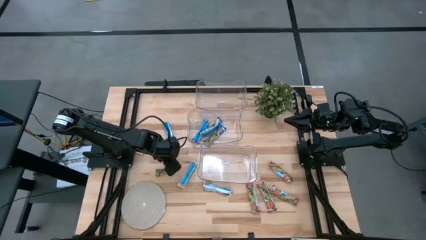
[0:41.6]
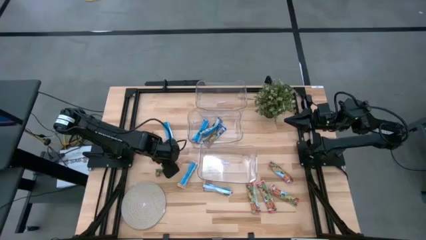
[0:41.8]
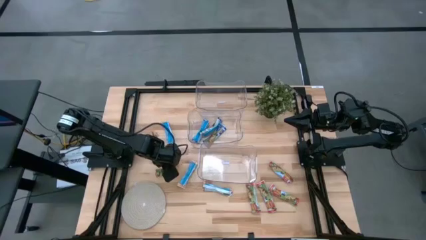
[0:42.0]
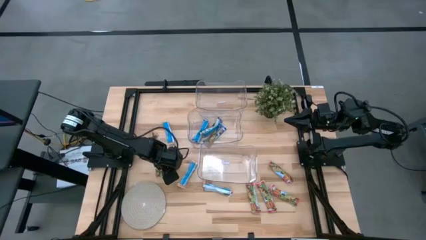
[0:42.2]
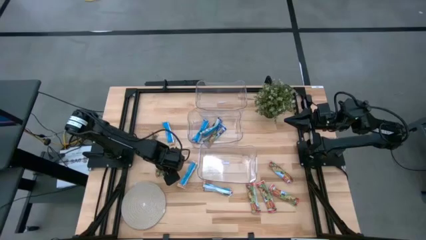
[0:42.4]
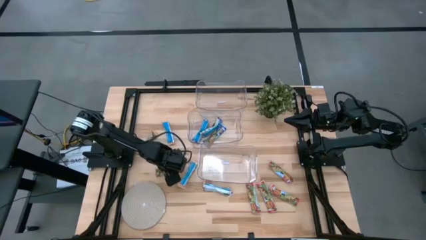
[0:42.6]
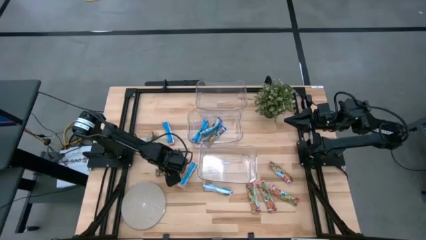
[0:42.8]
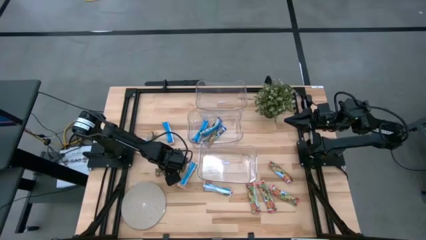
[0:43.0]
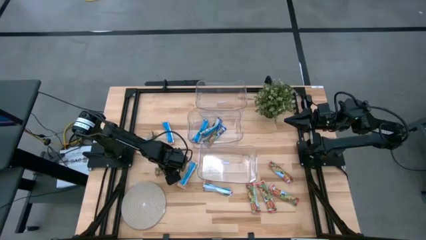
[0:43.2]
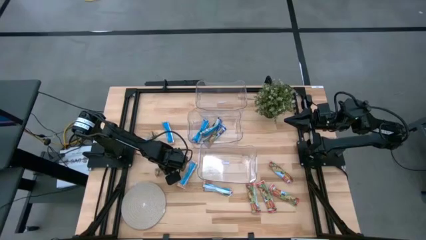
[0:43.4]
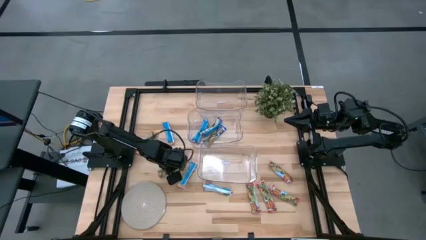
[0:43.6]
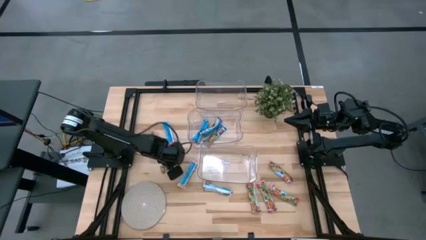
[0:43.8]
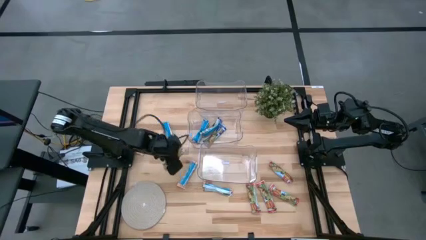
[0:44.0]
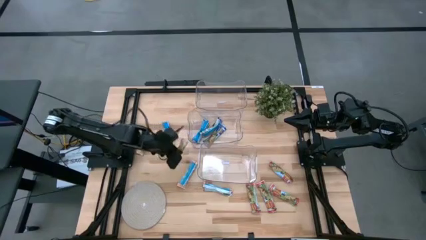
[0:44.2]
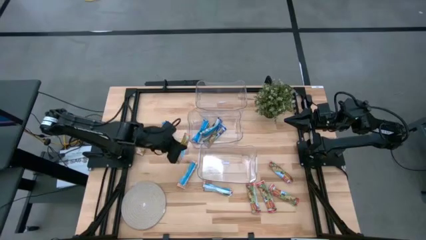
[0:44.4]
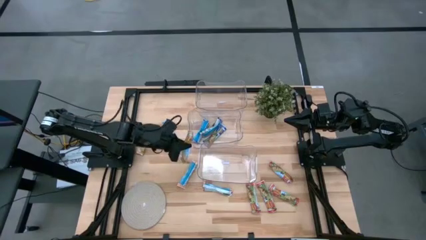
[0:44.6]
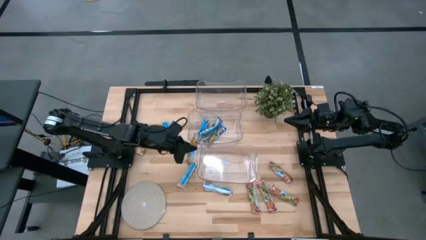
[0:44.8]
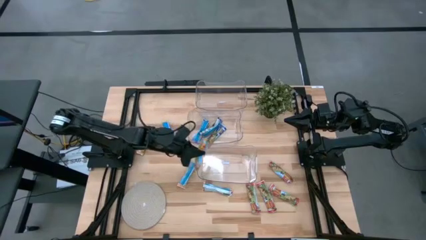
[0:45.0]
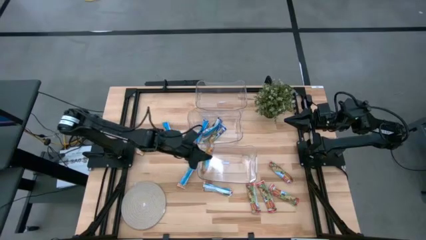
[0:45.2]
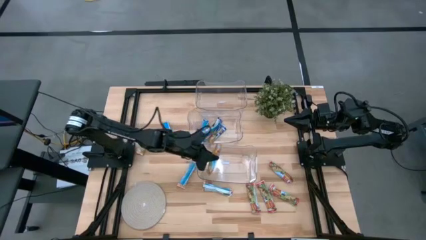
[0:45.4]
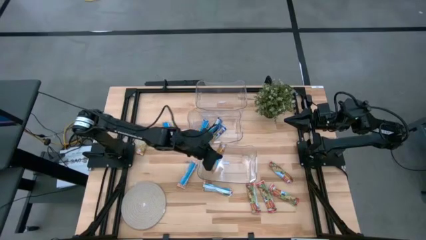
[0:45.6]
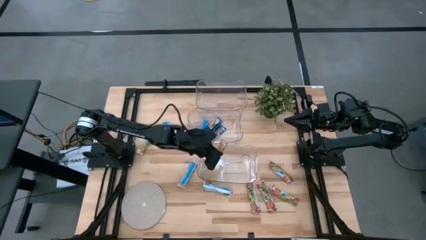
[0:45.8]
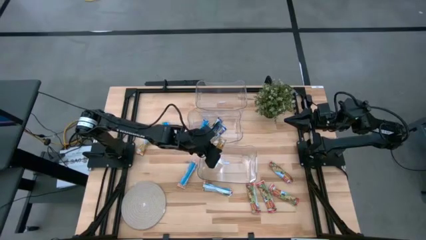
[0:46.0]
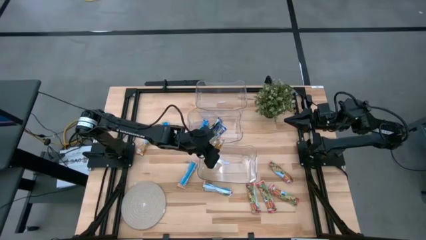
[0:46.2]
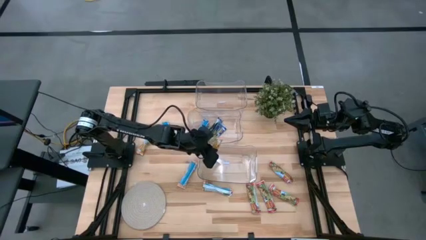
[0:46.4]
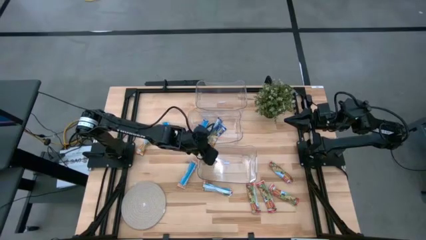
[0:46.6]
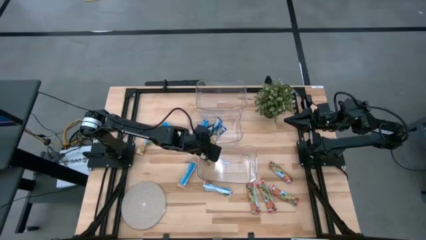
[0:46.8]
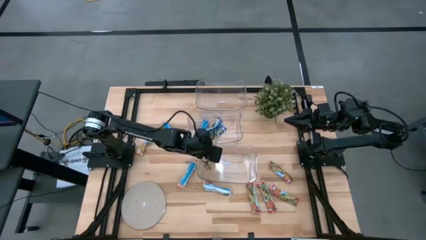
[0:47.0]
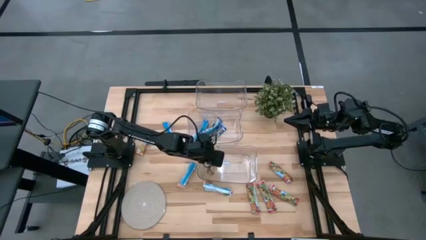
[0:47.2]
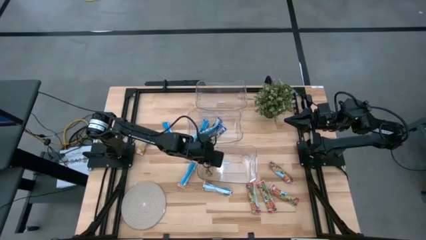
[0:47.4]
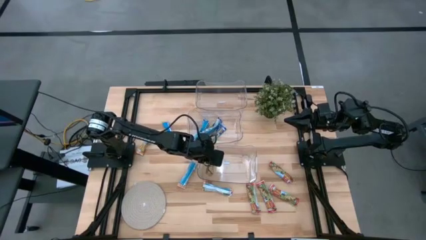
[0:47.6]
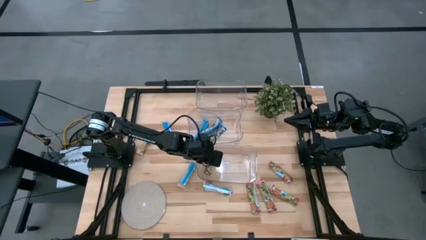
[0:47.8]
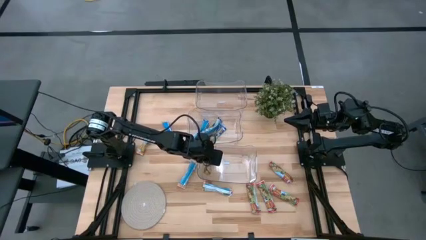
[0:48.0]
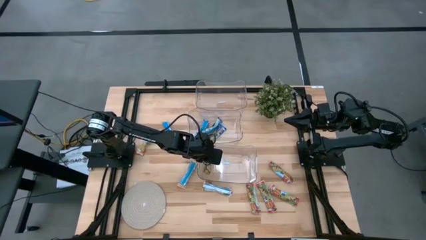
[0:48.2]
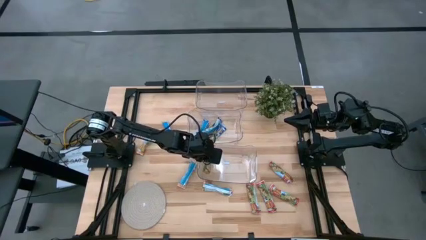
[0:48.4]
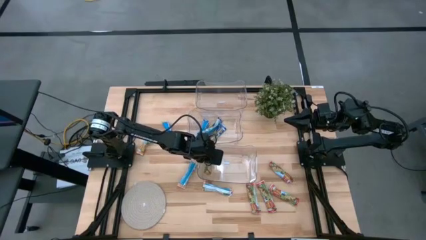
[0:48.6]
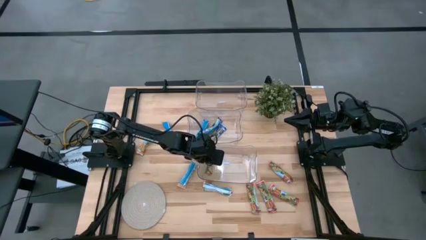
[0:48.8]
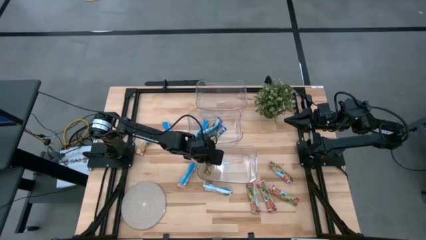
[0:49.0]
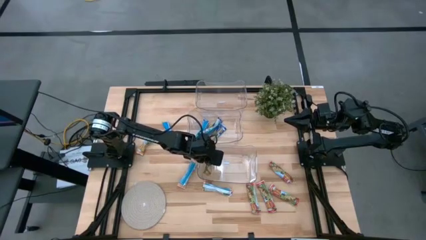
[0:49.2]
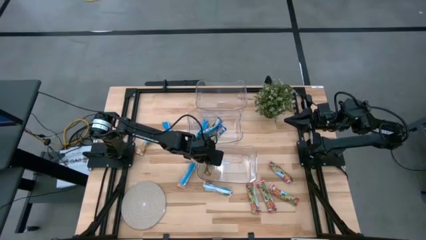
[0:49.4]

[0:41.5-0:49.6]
Task: Pick and place Granola Bars by type
Put the yellow granola bar into the bottom transparent bin

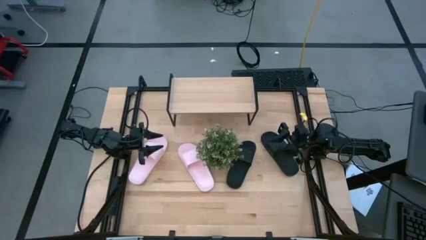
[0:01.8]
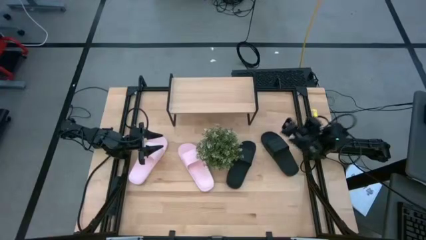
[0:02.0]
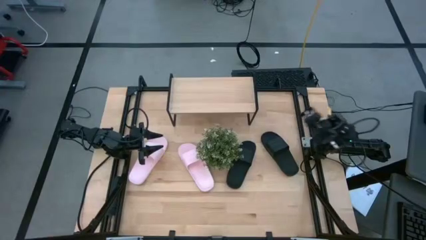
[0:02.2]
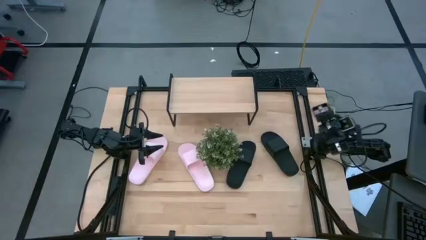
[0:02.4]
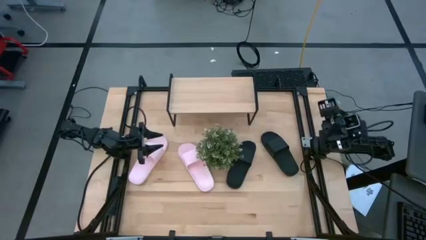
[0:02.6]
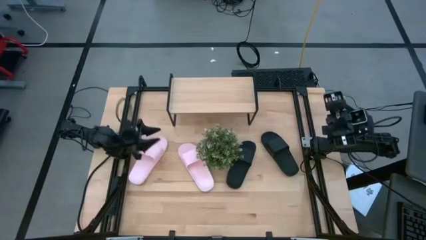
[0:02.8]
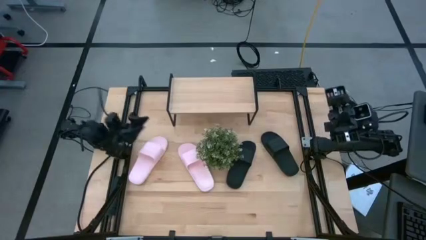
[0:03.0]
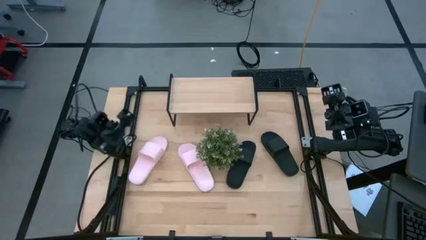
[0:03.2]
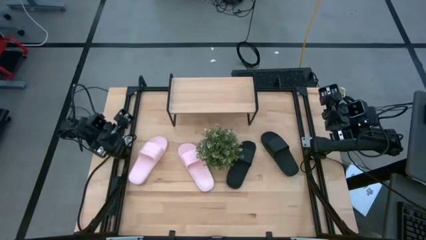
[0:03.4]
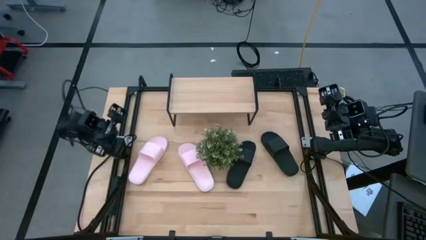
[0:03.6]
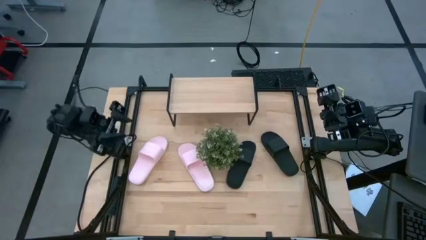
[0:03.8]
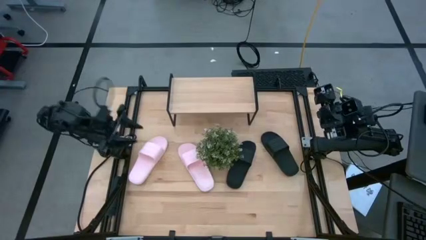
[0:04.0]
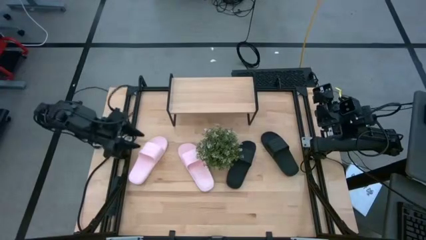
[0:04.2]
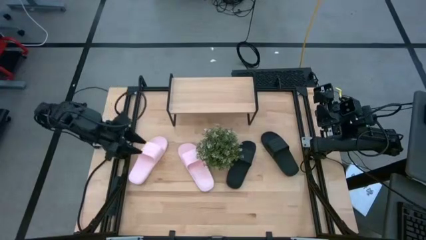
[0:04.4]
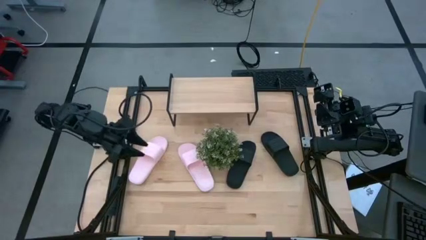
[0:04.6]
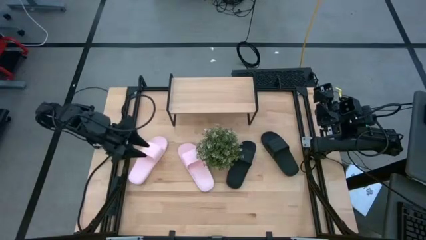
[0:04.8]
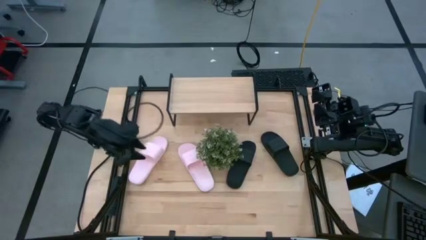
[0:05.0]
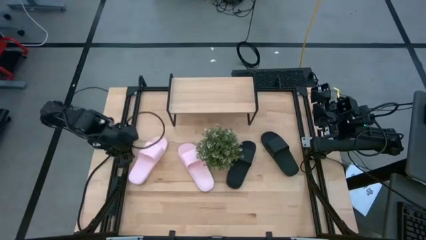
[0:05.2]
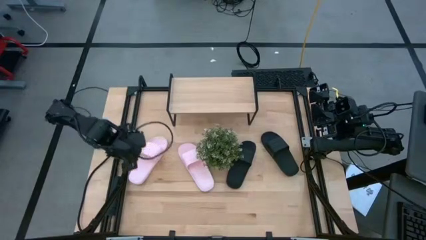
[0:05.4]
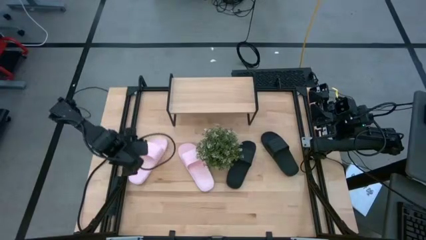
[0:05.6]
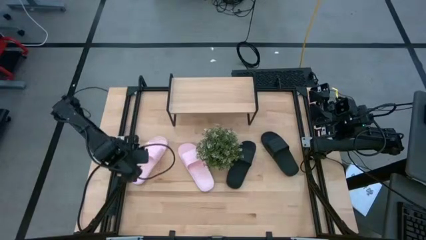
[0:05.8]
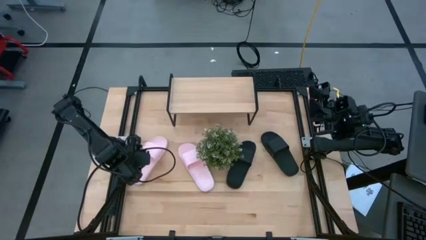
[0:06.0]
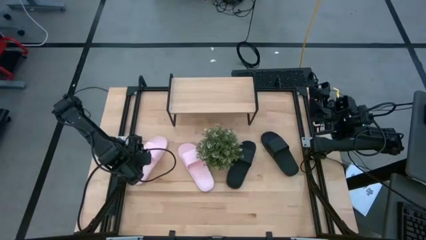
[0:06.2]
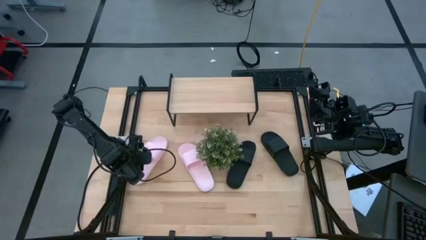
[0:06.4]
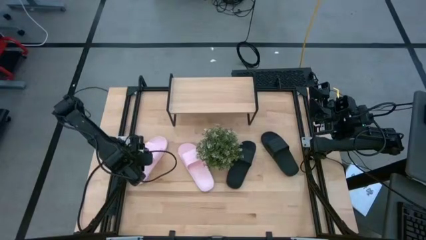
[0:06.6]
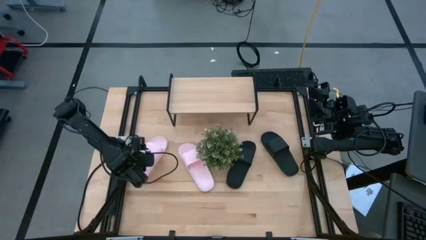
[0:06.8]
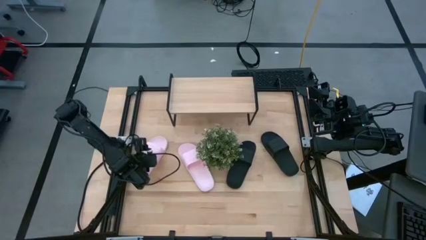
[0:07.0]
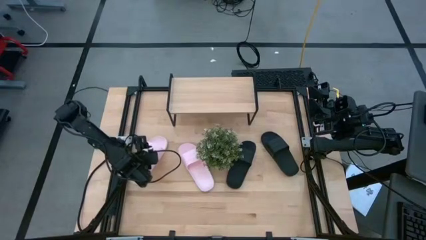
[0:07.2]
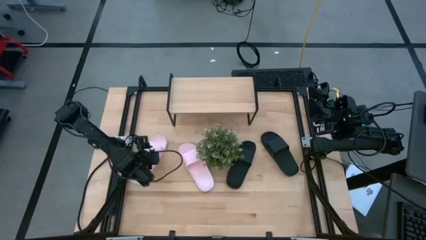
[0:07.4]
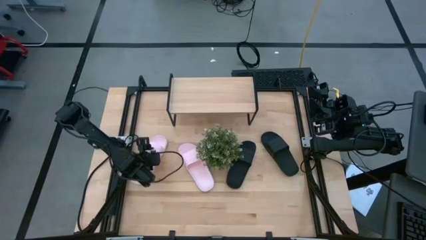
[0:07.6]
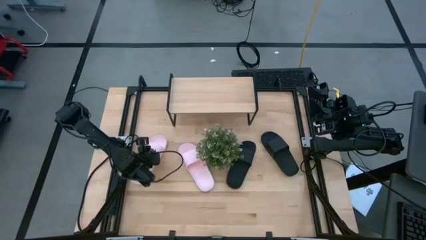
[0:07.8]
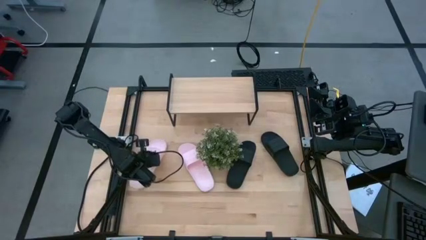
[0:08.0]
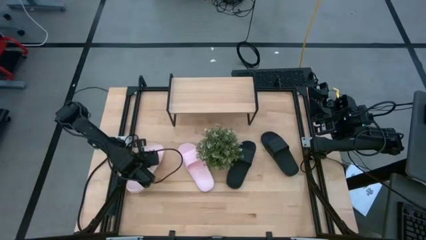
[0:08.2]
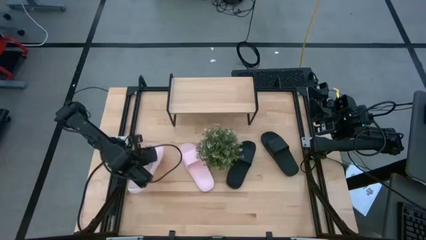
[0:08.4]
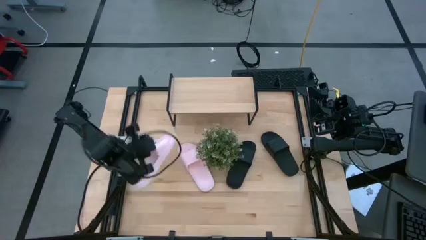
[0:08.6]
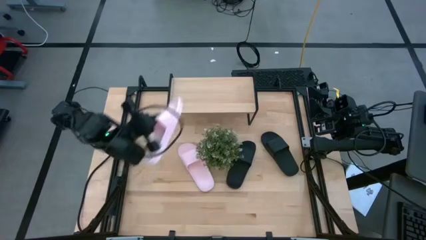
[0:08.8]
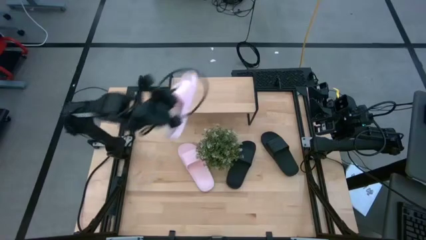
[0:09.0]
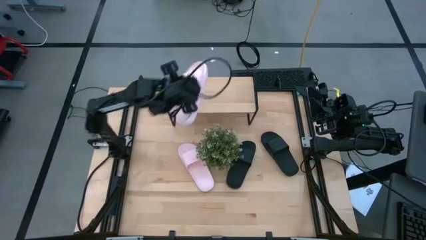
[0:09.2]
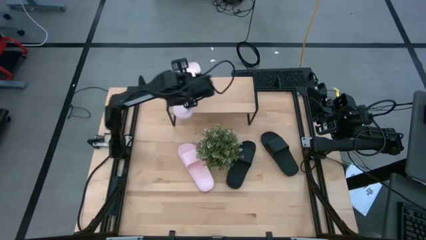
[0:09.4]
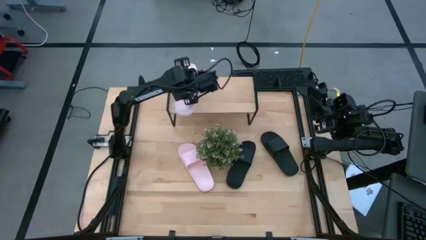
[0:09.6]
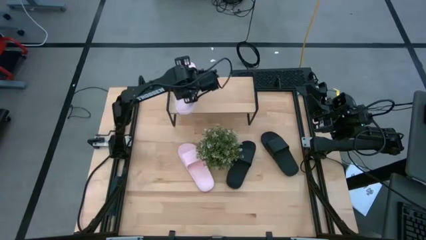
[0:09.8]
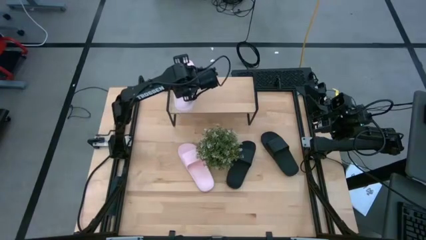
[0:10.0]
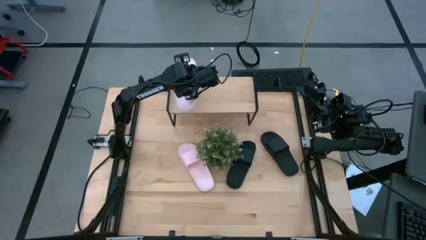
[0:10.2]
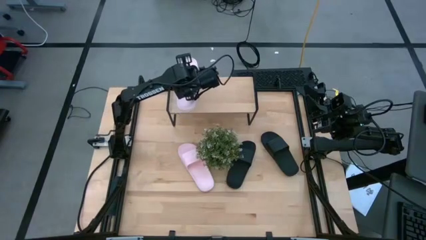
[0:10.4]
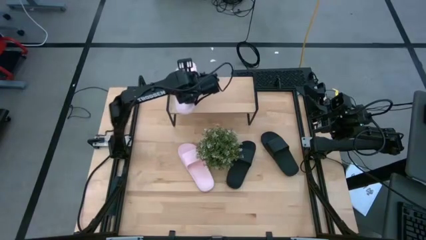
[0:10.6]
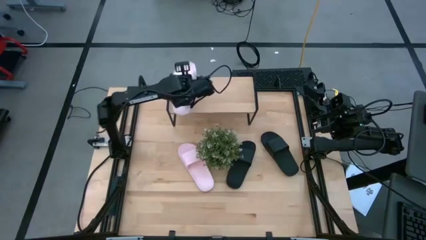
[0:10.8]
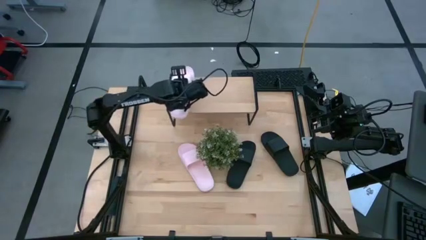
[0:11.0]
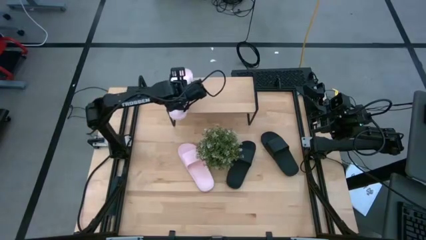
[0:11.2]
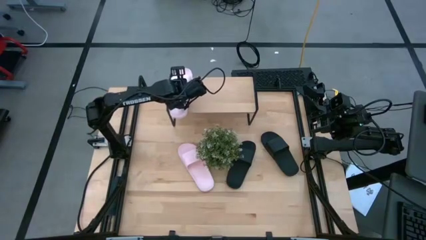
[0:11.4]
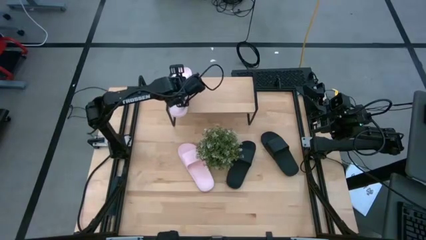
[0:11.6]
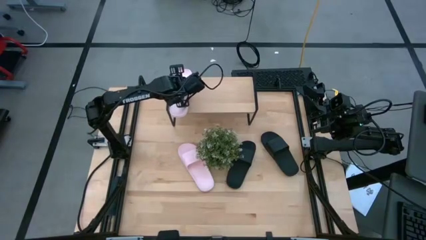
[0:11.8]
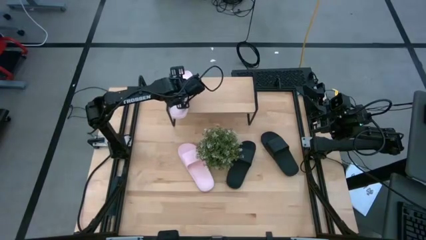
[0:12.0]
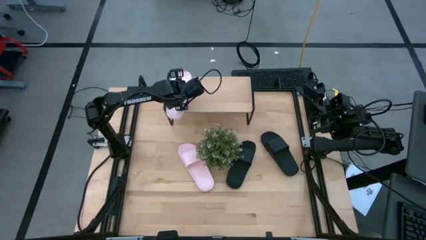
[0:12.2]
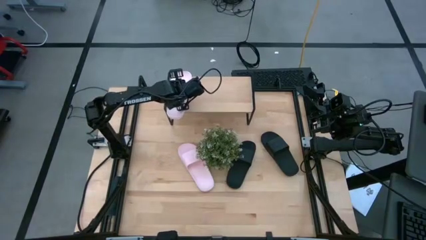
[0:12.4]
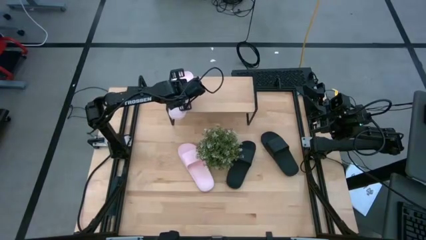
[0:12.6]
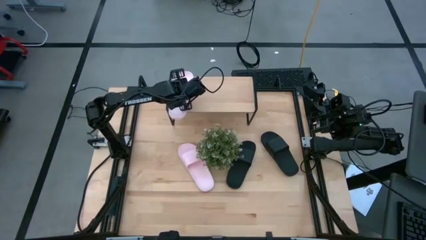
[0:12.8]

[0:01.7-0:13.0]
Task: Pick and place slides into the shelf
Put the left pink slides on the shelf
